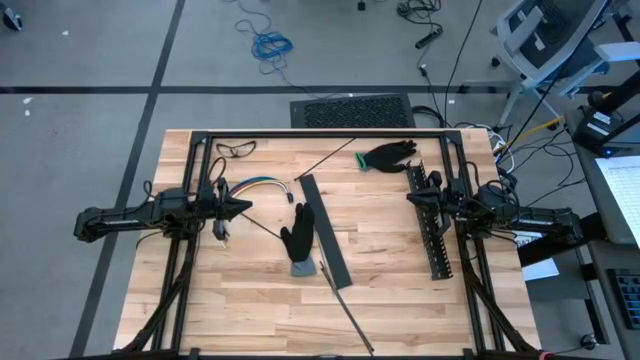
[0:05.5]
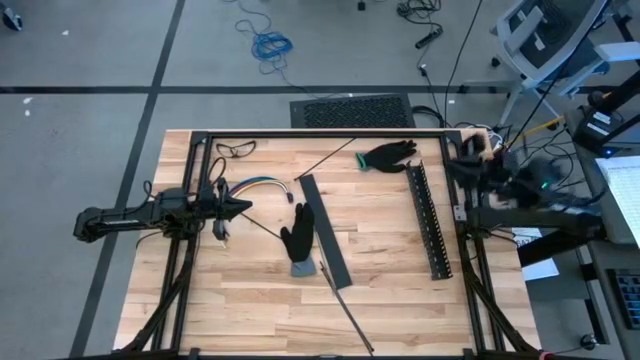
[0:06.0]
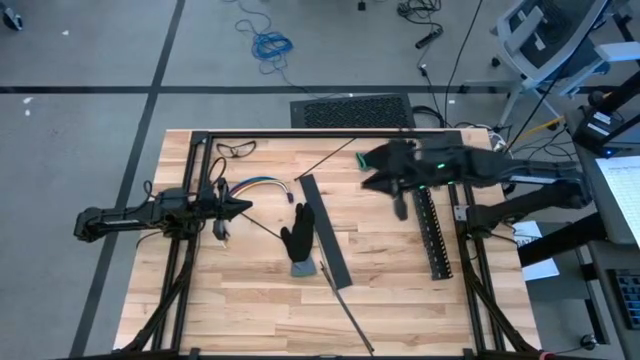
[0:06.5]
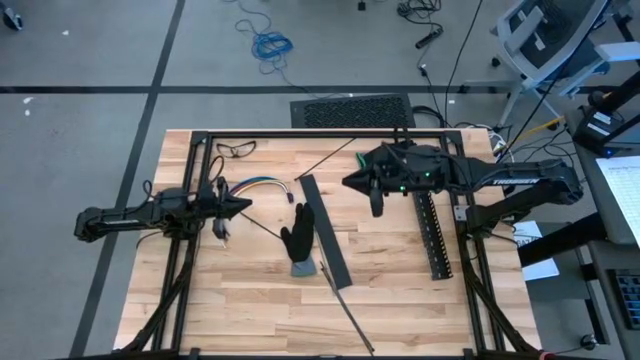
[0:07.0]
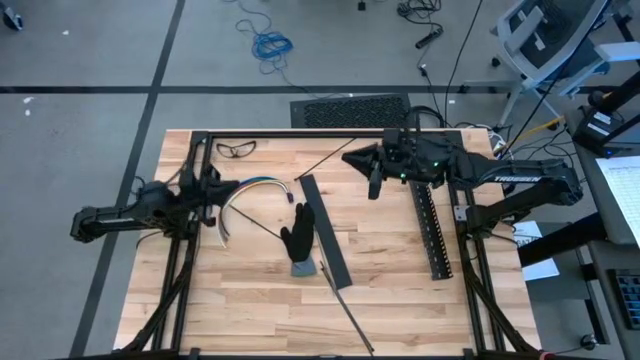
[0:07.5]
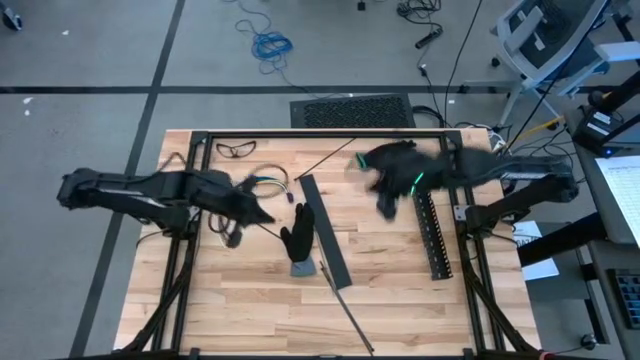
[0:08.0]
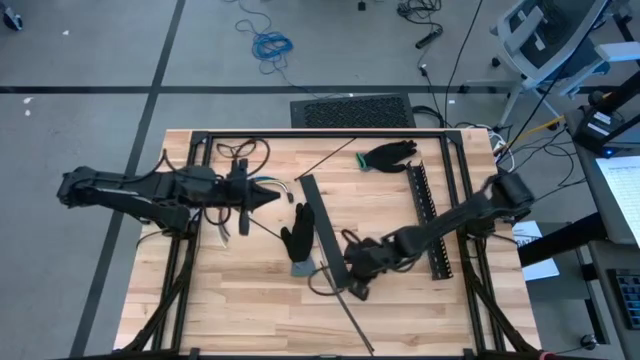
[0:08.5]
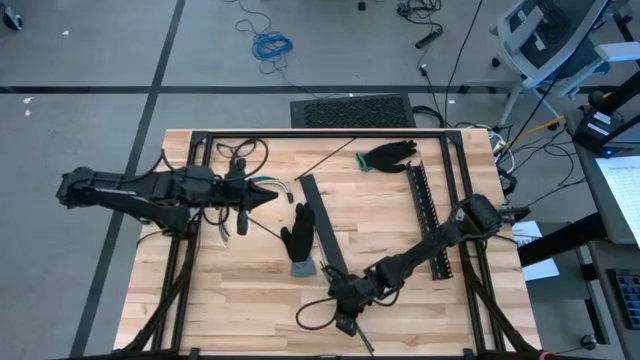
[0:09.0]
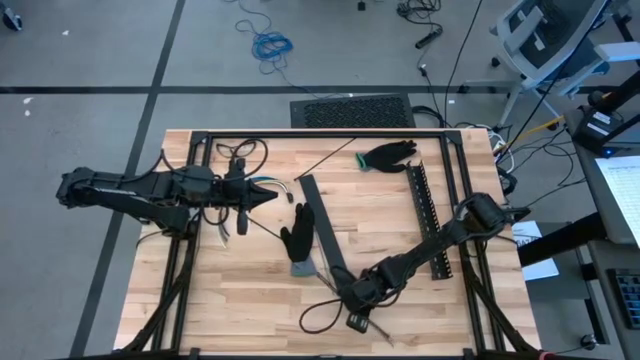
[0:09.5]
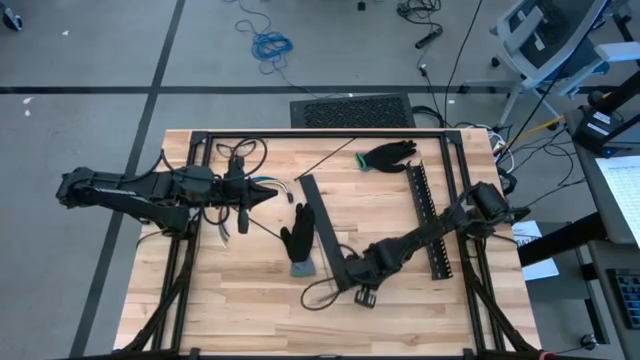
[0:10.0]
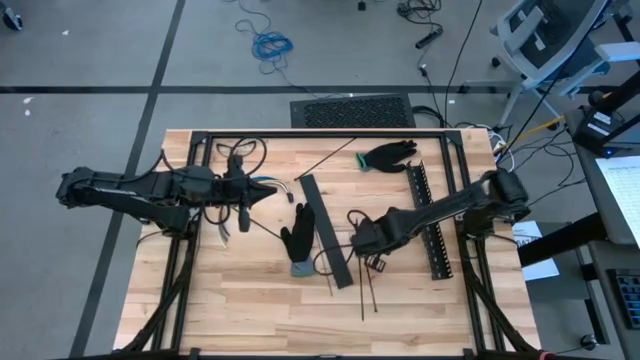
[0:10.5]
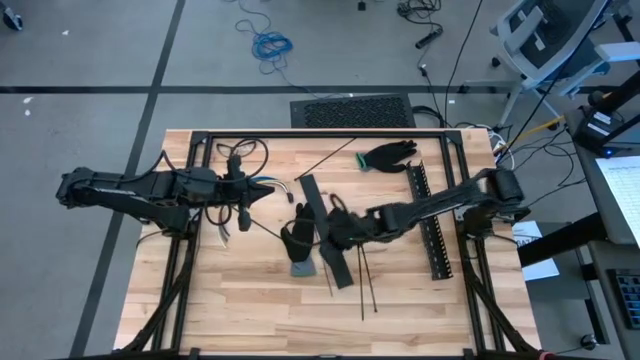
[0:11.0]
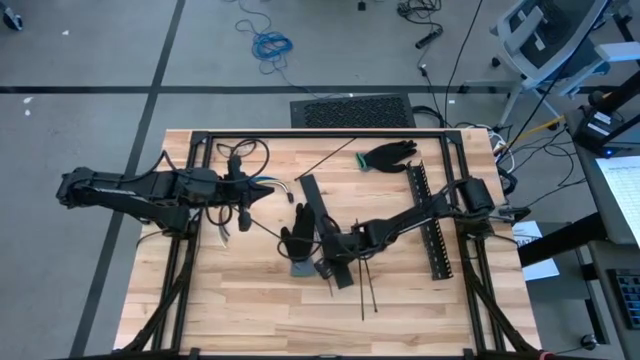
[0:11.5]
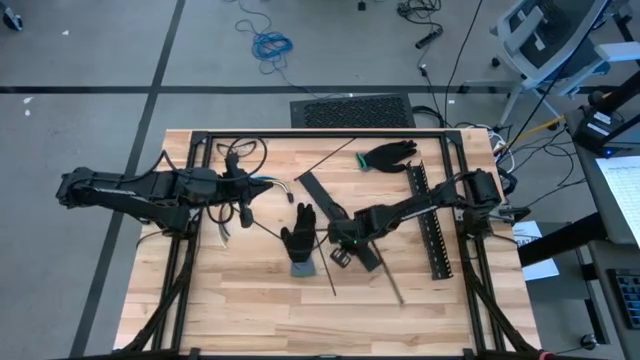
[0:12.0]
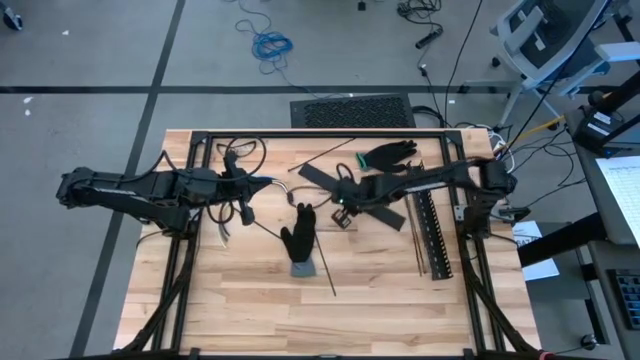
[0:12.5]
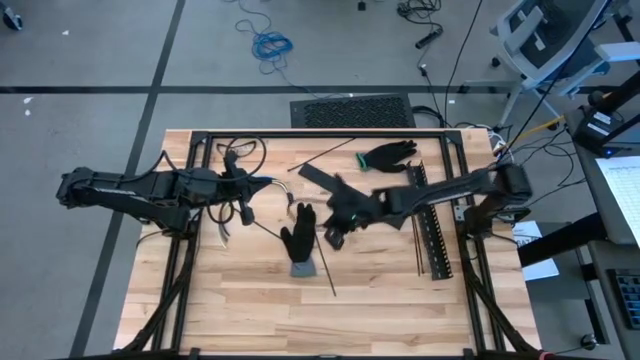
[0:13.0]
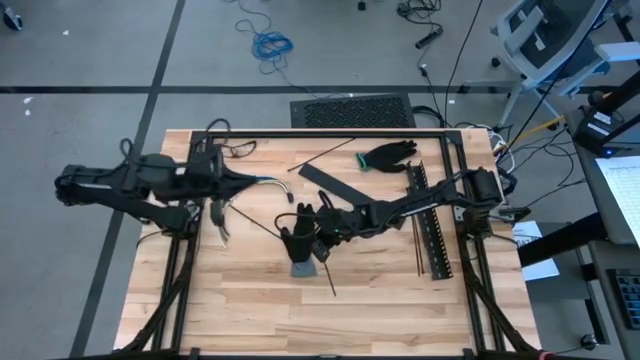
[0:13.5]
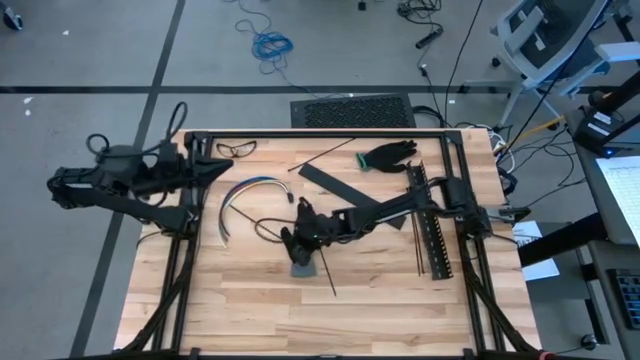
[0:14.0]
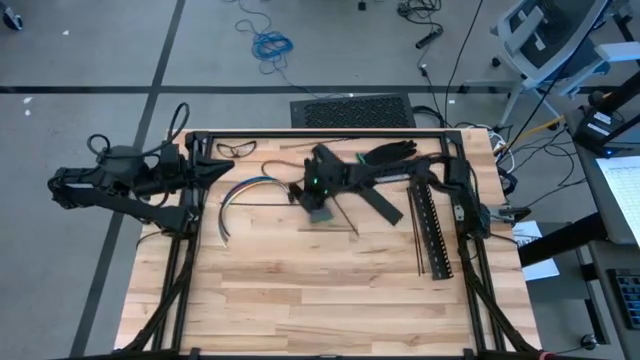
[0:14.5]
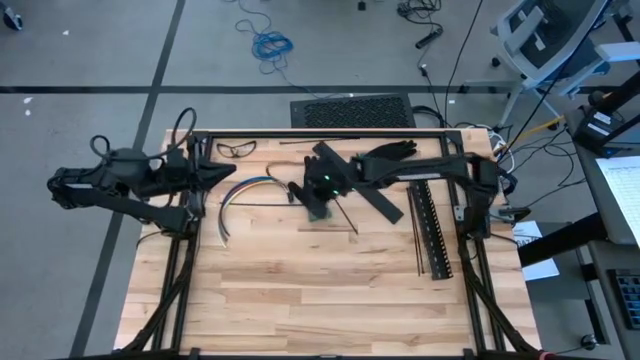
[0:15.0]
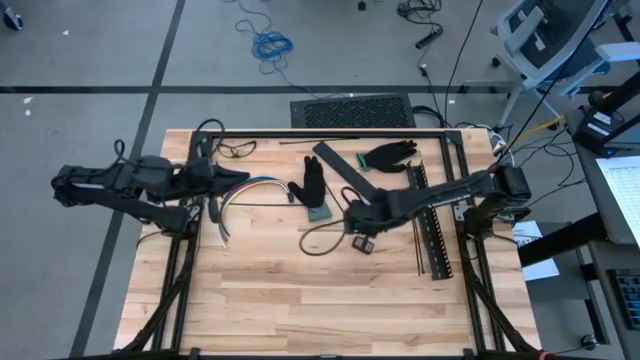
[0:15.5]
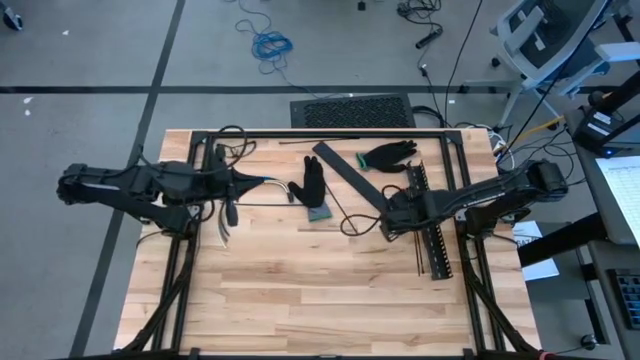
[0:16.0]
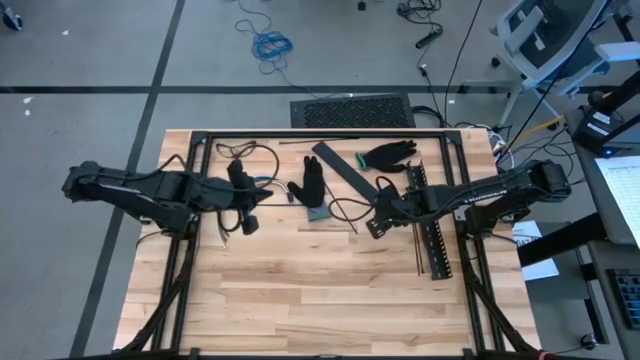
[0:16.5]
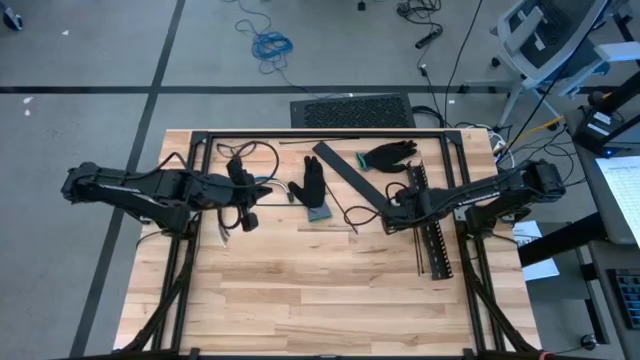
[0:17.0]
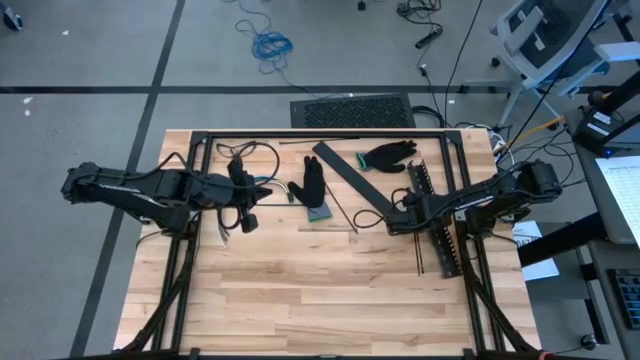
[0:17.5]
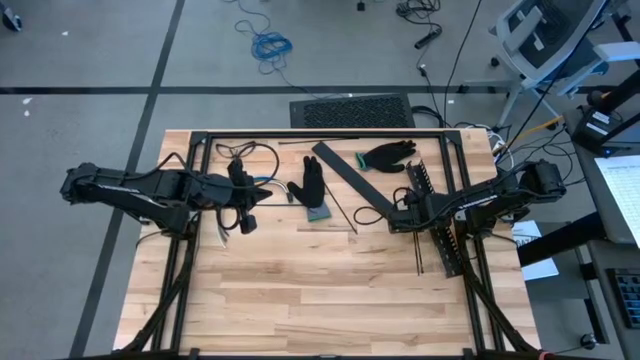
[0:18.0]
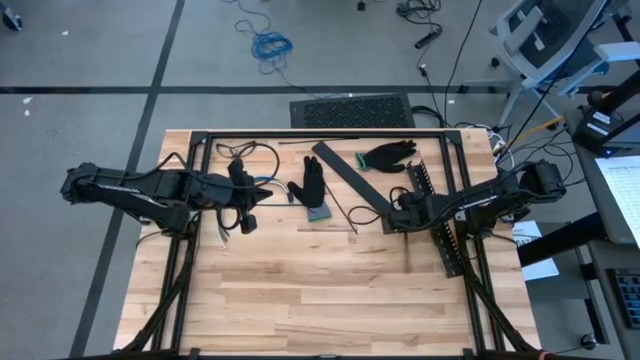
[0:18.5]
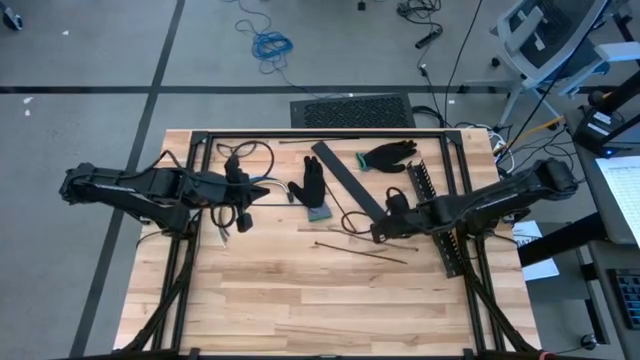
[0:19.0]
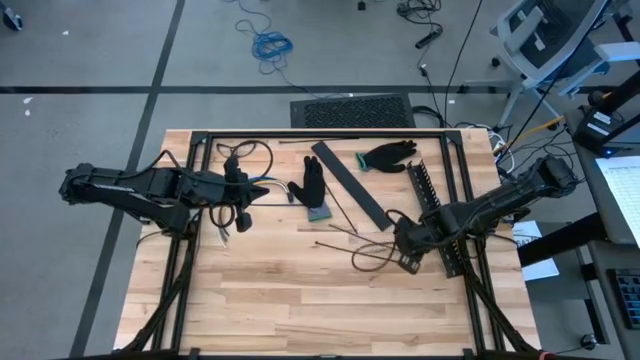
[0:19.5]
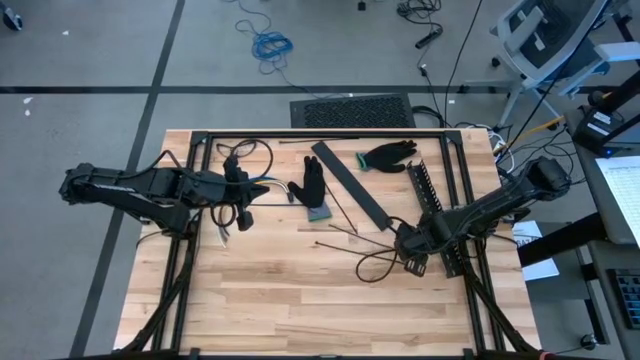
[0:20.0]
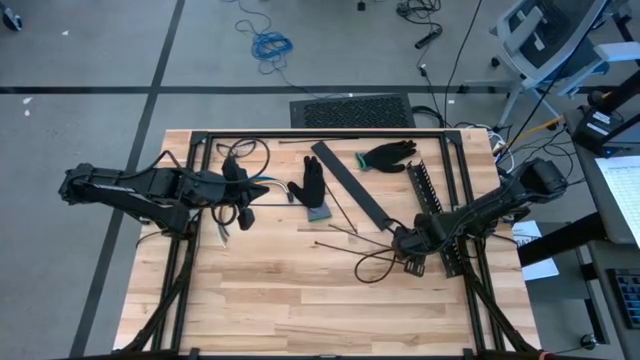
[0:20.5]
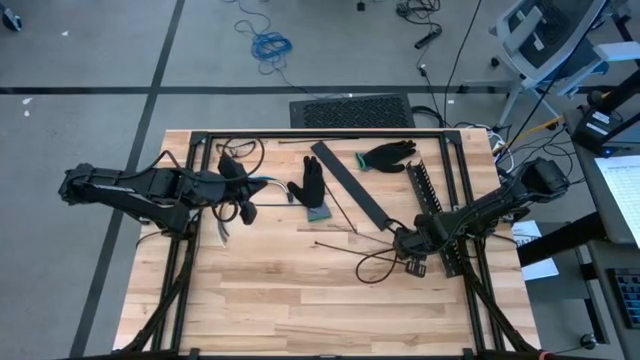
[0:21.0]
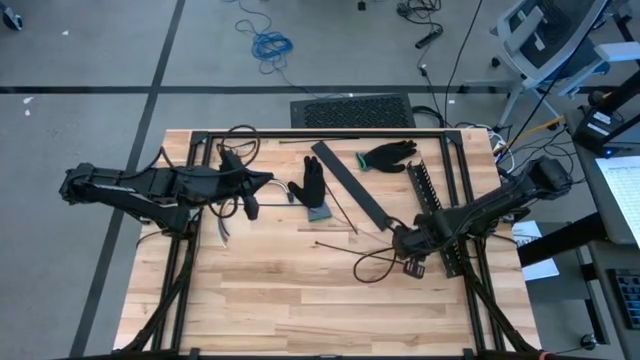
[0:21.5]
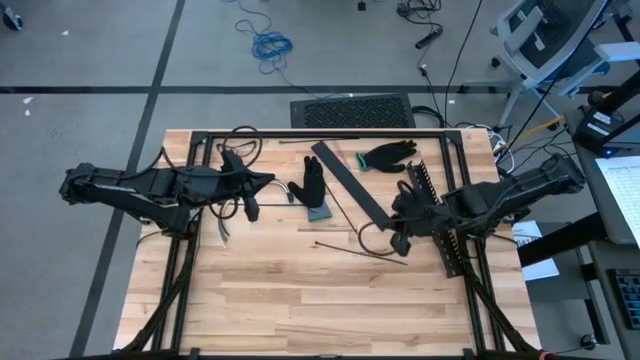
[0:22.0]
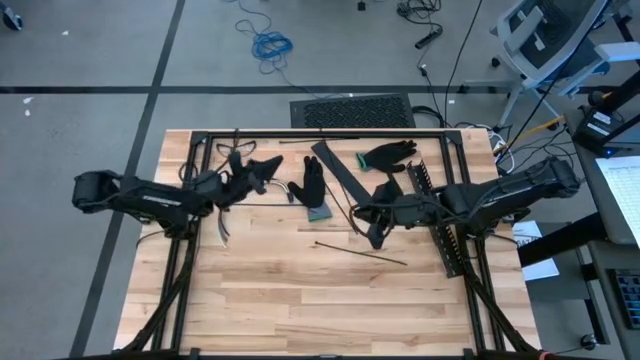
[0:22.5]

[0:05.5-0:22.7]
Task: Ziptie cables
Wrap the black zip tie on the cable

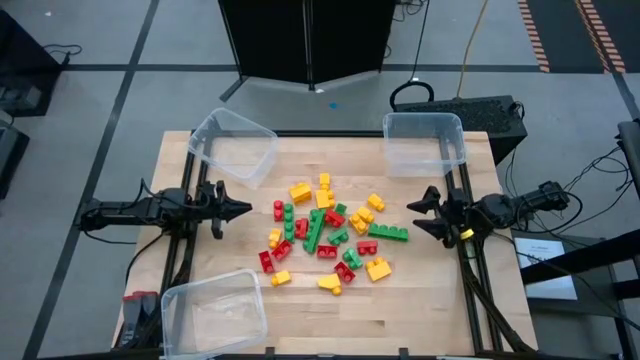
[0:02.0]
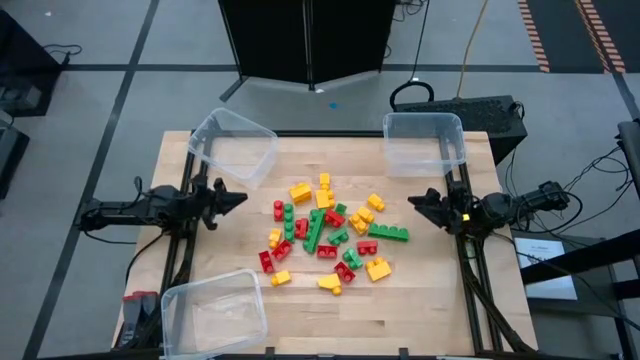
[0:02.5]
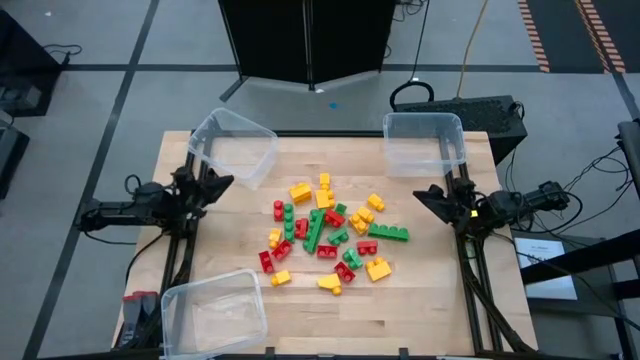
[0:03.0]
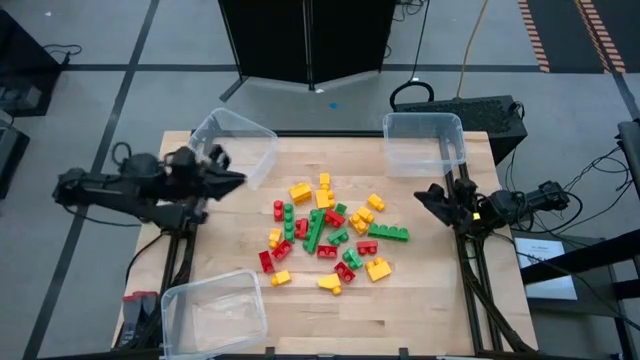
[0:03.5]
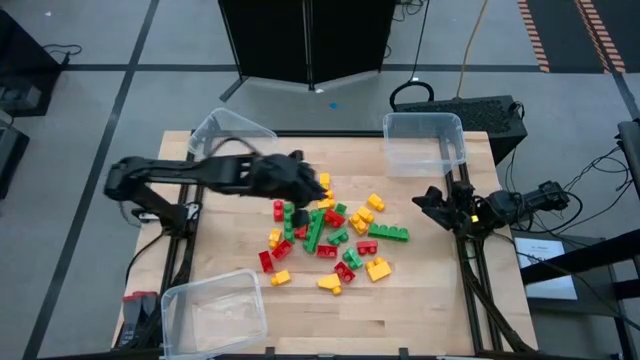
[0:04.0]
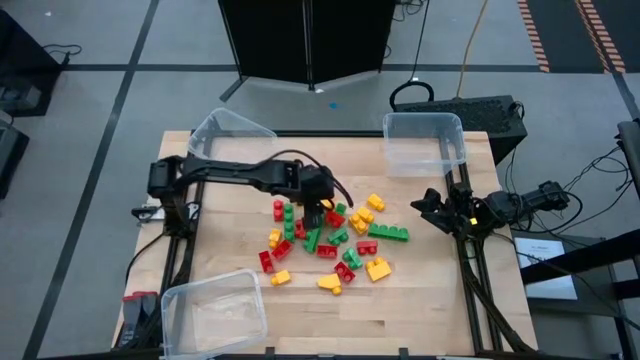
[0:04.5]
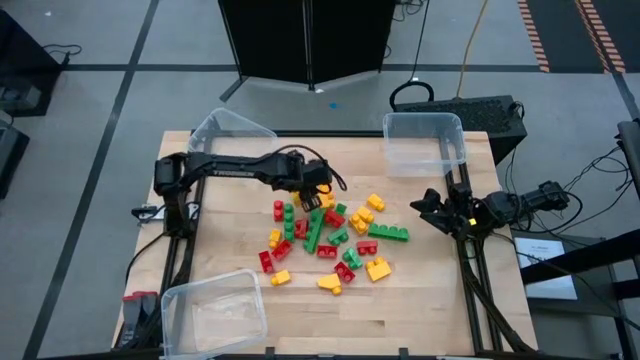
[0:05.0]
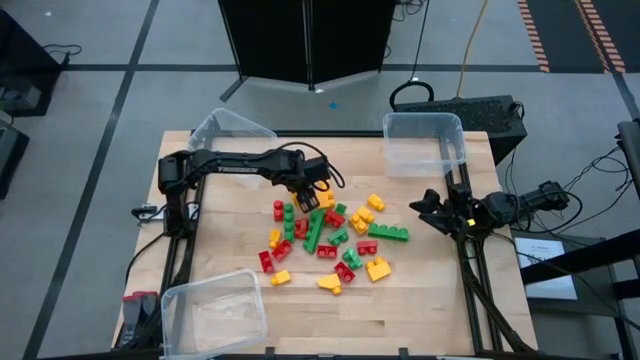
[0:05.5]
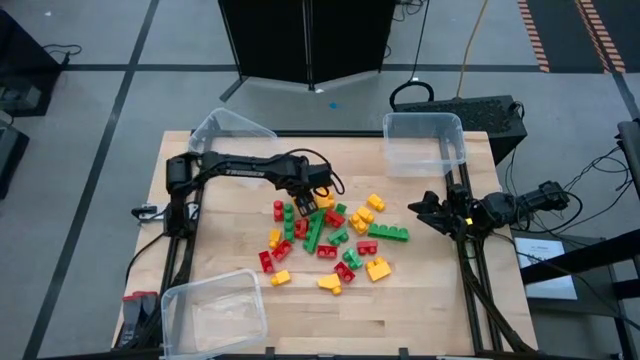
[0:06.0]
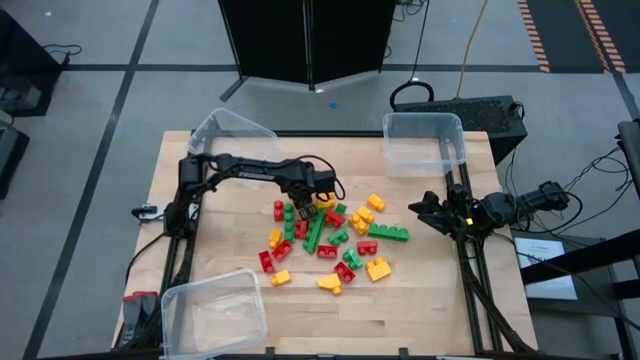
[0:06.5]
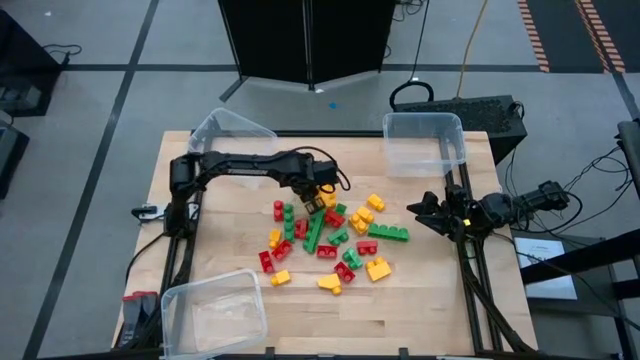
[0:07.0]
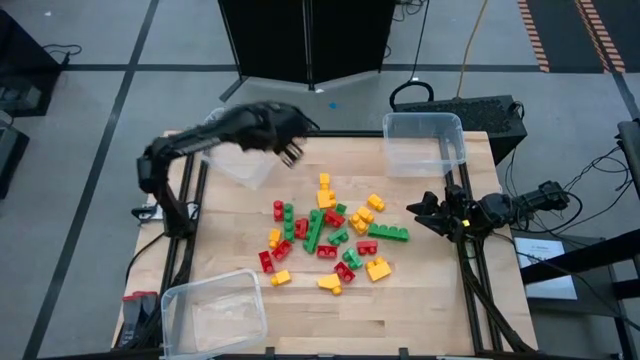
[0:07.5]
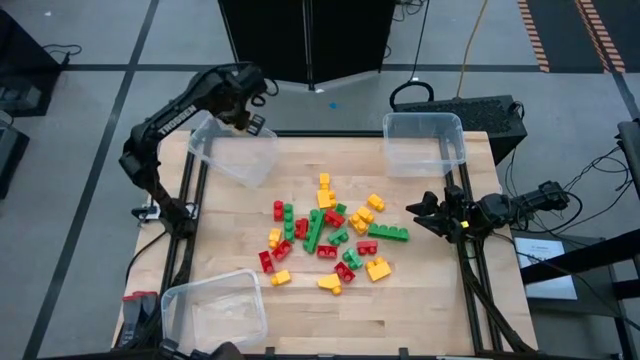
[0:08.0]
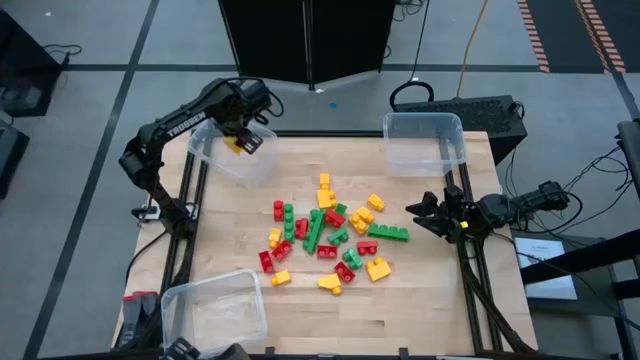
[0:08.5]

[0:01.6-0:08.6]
Task: Sort blocks
Put the yellow game piece into the top left transparent bin
